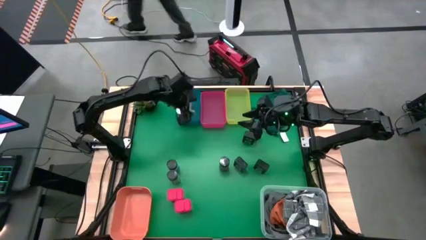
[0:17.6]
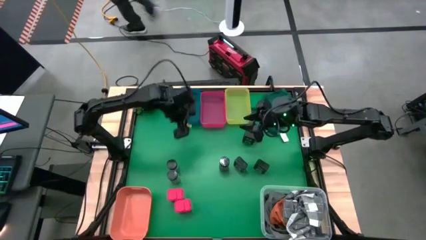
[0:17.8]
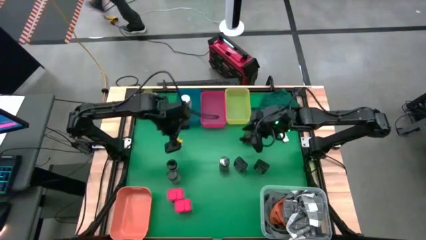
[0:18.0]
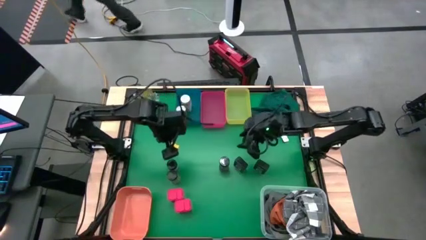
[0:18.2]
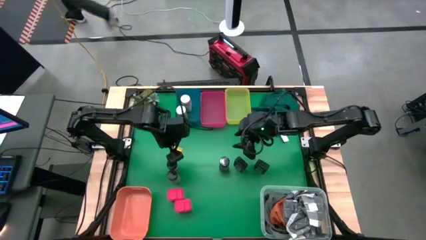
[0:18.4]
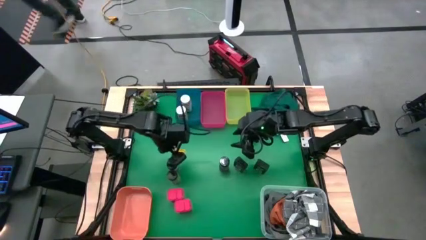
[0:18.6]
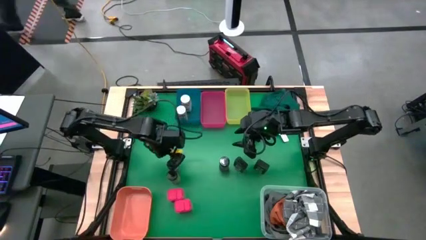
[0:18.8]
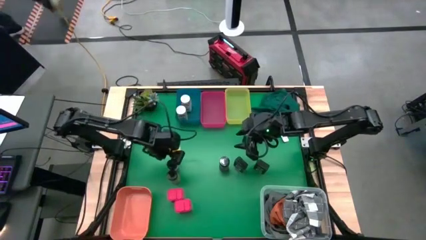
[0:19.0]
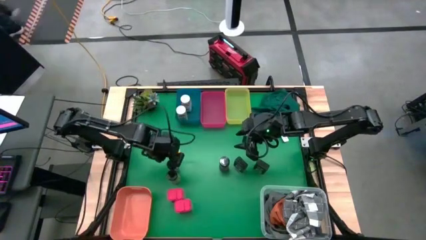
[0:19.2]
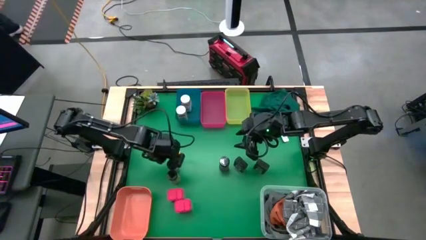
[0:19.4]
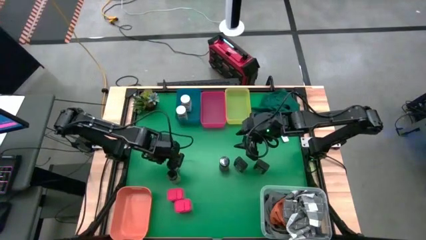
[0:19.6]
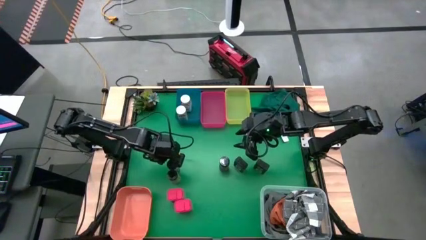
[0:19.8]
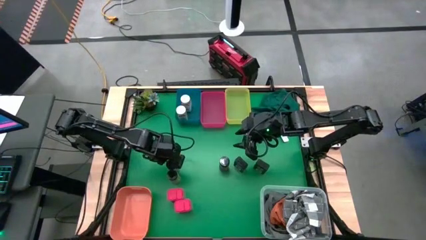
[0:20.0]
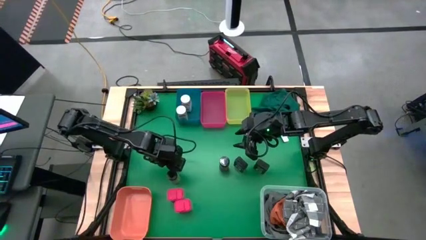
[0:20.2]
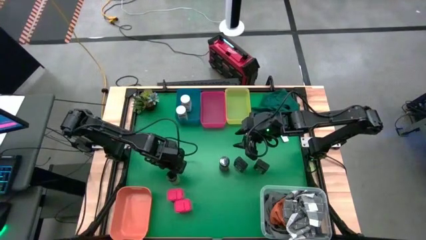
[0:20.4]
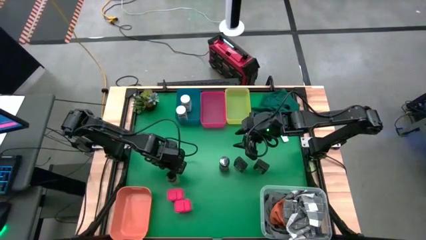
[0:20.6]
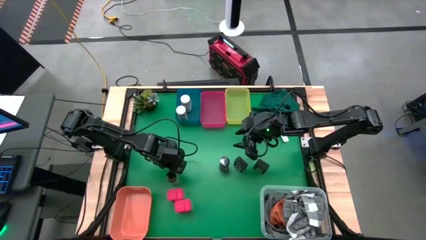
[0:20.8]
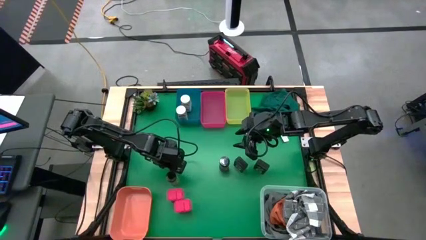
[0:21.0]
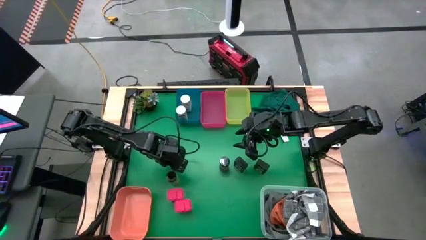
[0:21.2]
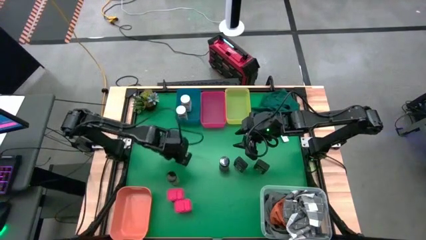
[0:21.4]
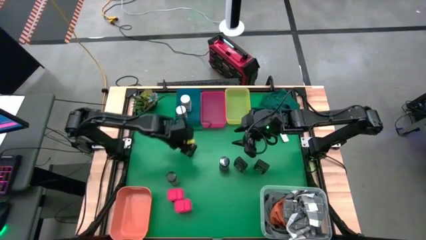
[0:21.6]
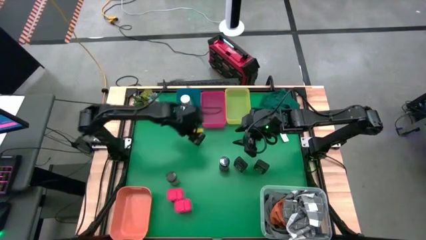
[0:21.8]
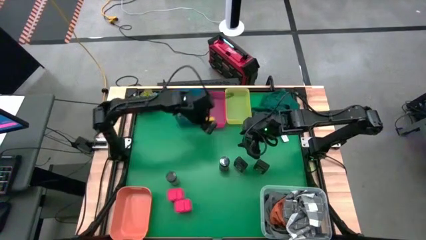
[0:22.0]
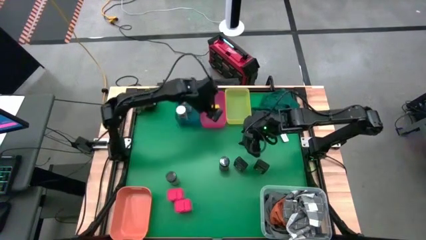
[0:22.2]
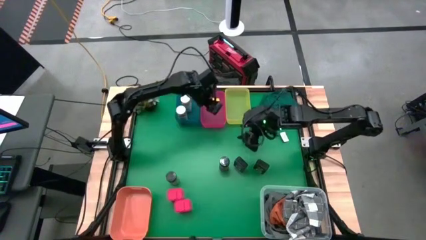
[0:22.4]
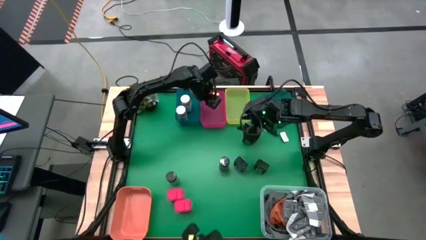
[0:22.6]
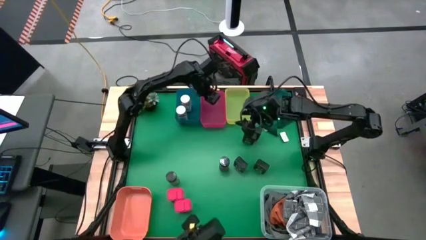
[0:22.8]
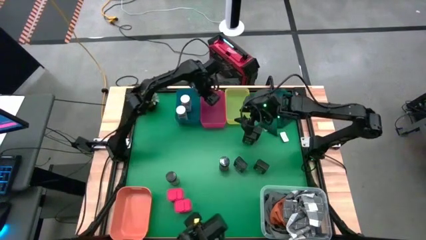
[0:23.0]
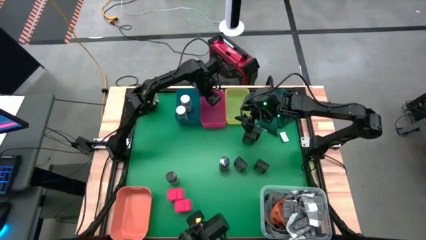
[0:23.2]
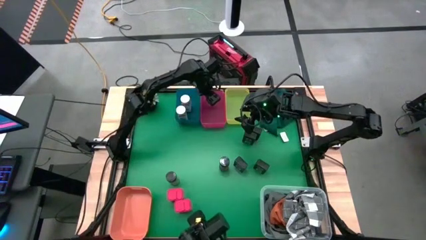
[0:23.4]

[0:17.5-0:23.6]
Task: Sort spices by type
Put the top left black seasoning bottle into the pink bin

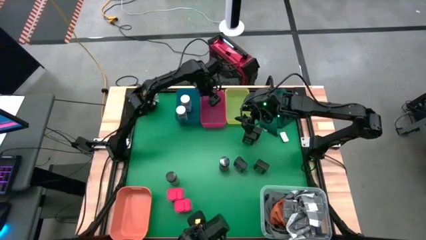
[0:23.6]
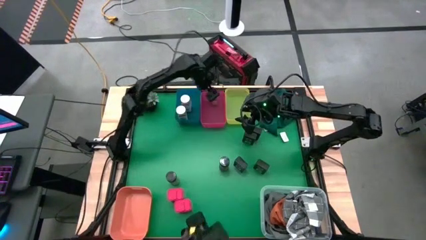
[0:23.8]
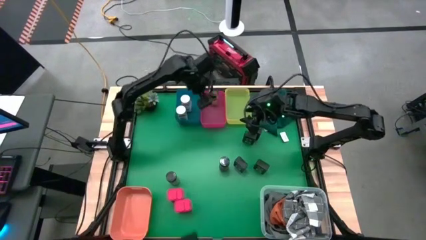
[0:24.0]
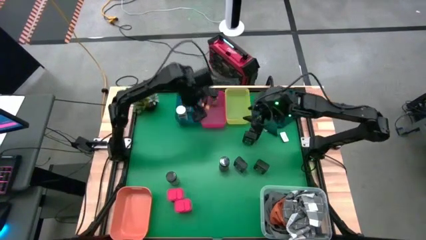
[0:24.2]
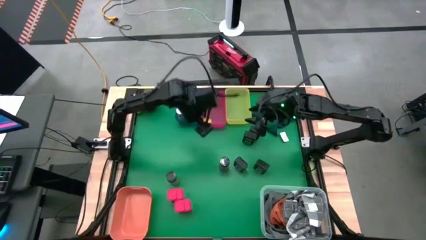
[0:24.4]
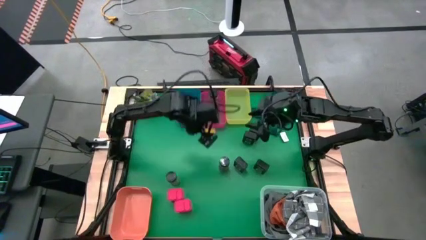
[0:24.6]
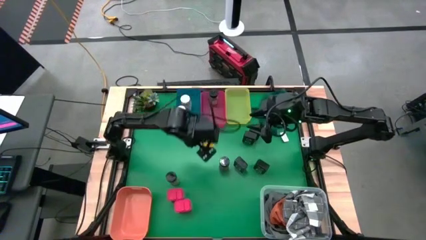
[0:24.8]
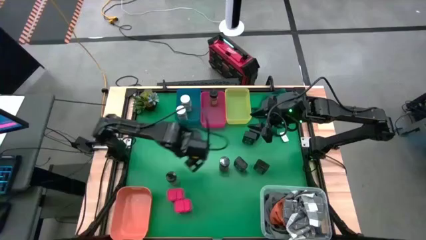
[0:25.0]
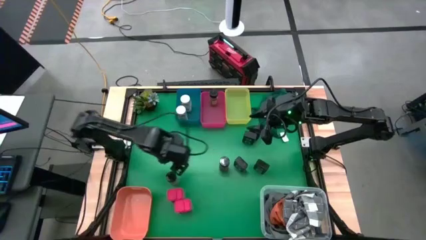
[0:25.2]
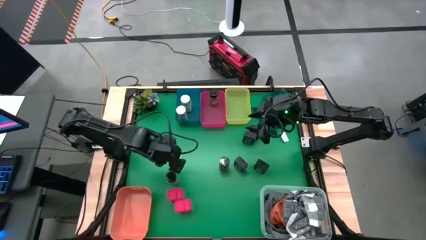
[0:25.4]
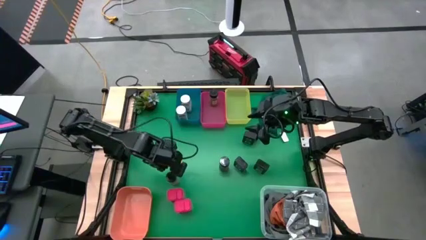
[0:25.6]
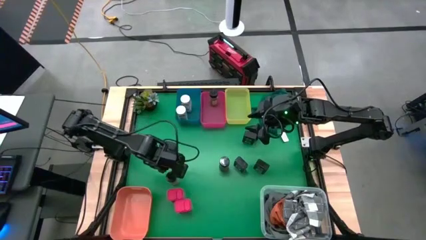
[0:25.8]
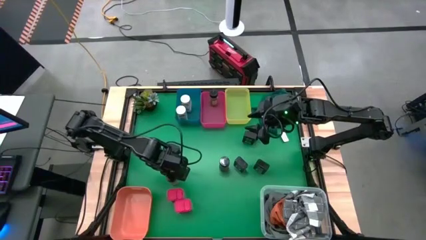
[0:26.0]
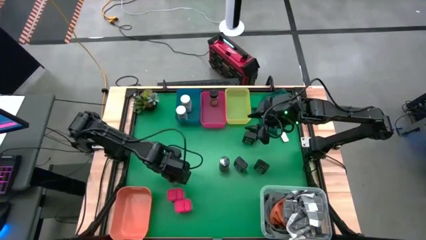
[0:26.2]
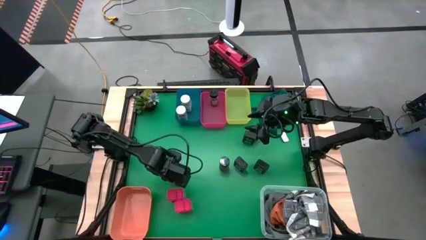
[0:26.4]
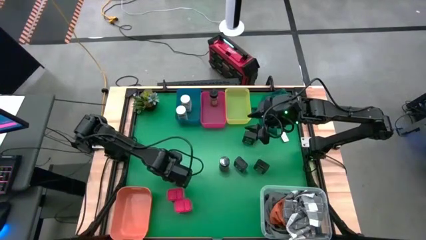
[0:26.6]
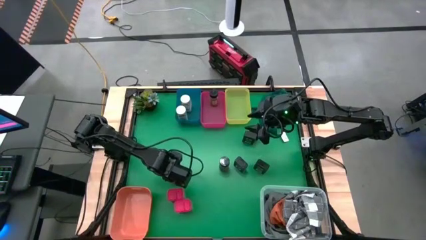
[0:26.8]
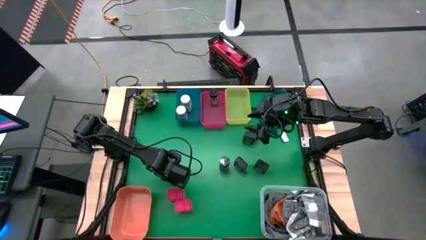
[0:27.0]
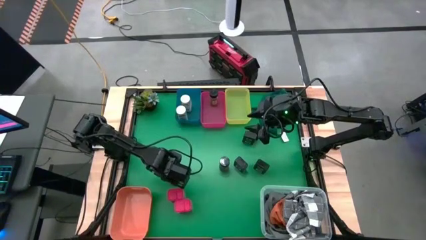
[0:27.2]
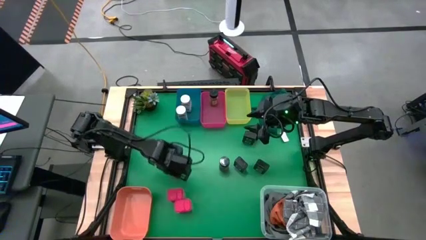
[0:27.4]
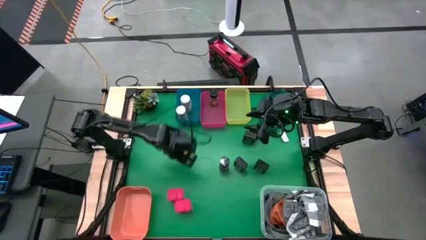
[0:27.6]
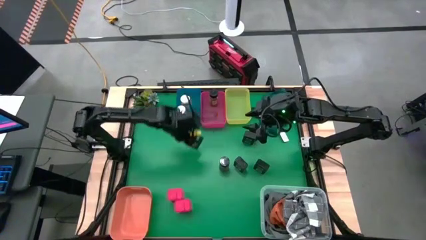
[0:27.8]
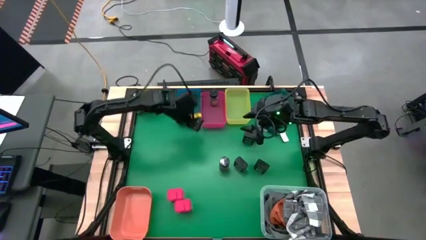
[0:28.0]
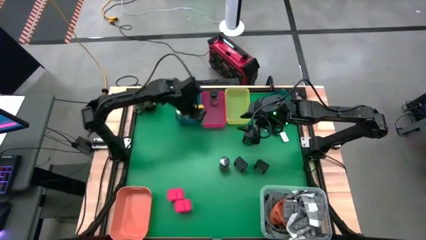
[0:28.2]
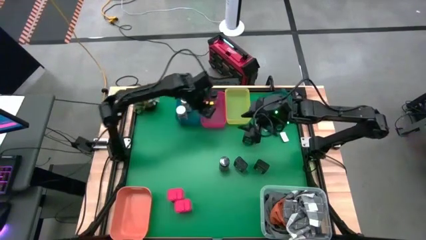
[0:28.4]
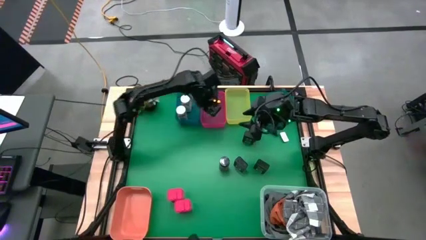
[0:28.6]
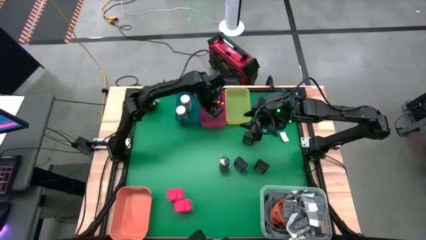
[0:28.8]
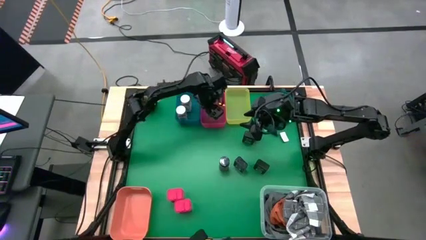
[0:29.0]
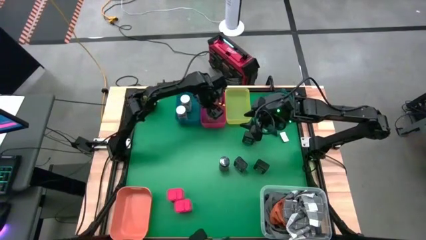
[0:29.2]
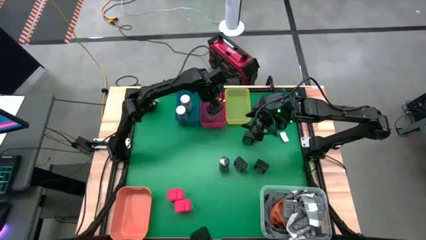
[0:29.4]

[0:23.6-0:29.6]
Put the left black seasoning bottle into the pink bin

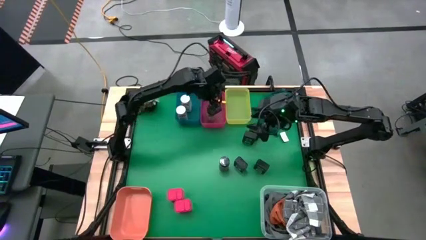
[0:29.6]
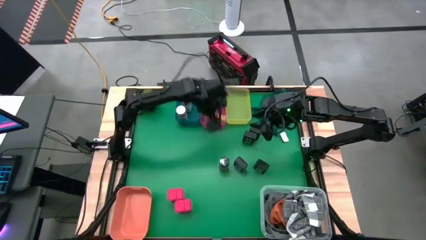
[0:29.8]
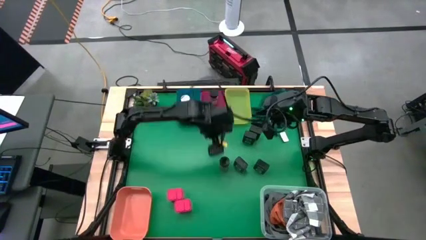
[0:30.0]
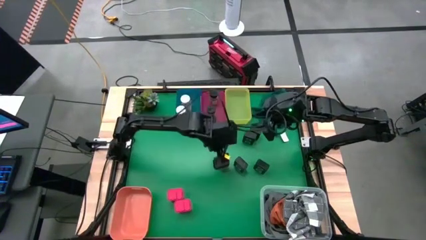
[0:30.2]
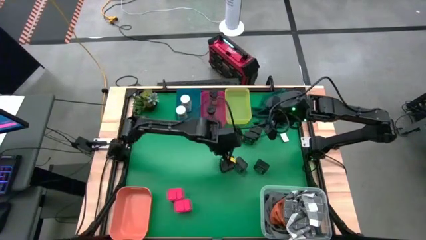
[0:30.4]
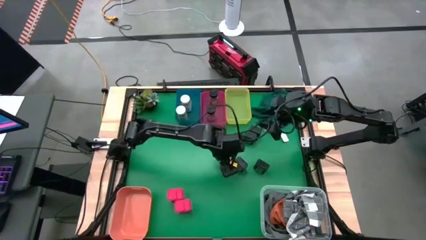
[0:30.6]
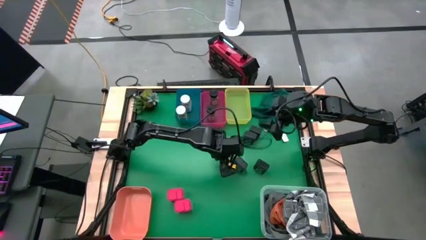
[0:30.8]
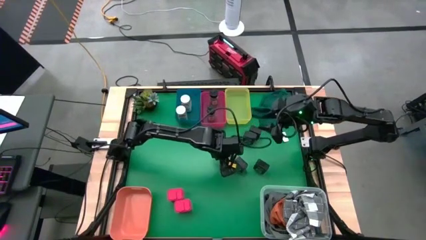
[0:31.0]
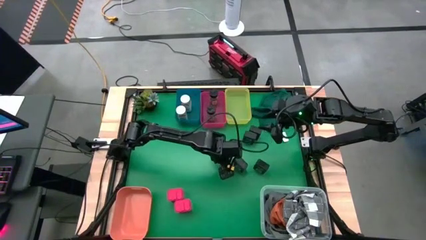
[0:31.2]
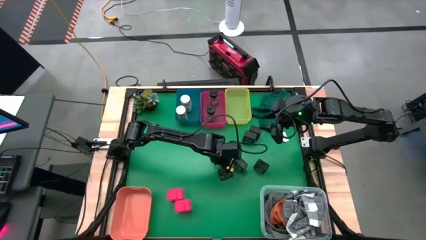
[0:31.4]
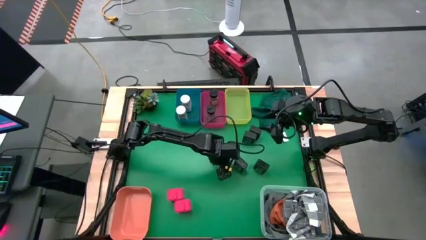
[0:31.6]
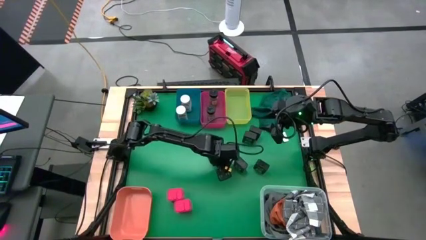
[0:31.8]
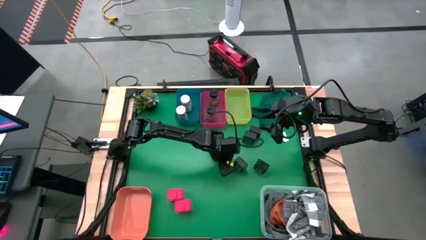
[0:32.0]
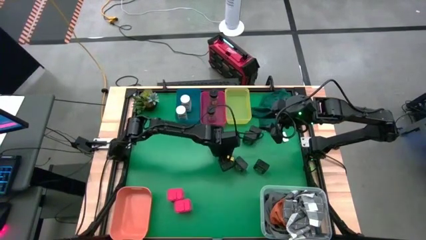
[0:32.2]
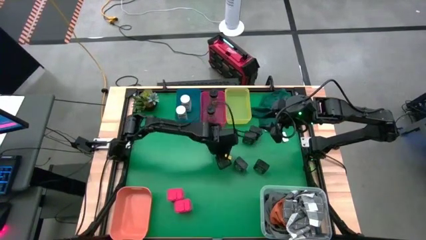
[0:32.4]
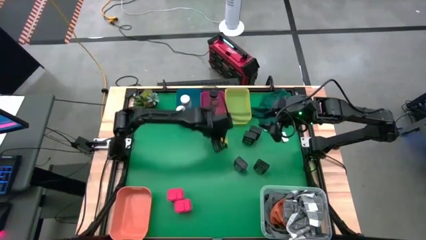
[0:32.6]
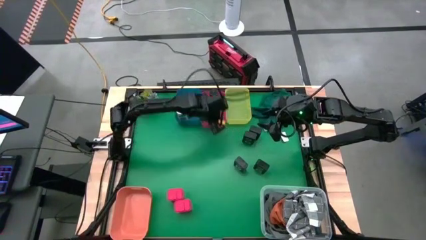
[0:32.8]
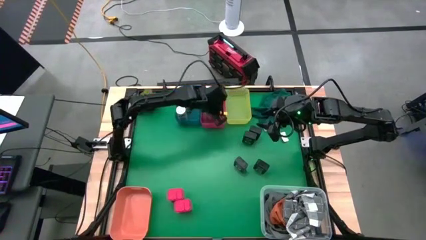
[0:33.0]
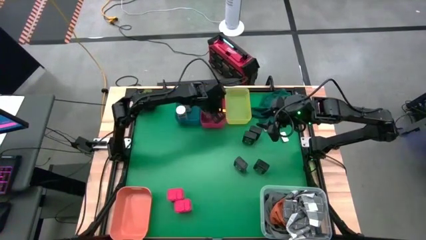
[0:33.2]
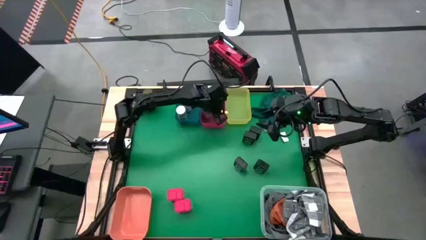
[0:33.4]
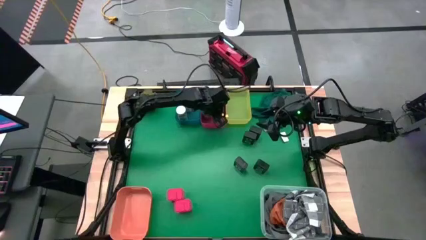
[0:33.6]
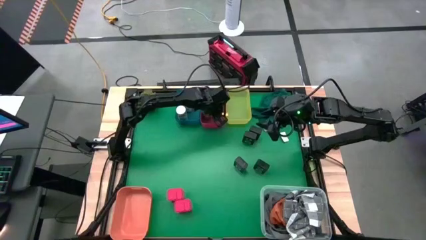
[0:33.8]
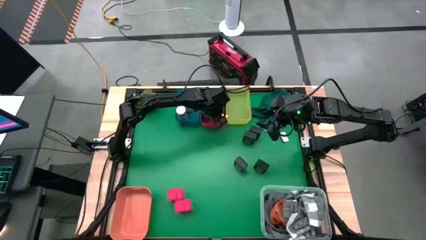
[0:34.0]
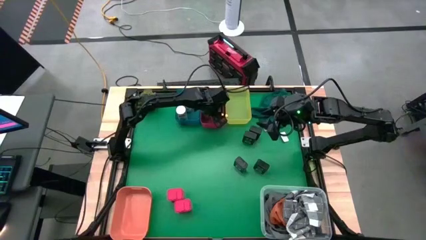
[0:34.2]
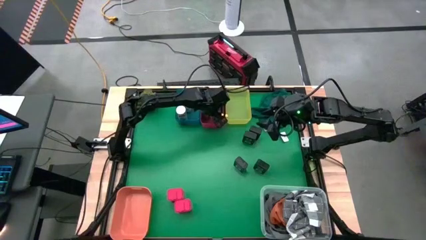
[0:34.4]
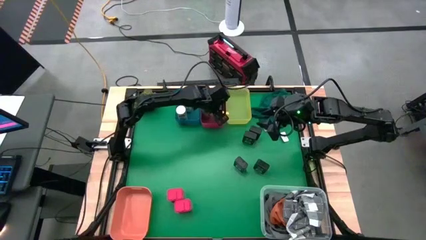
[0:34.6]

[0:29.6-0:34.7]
Put the black seasoning bottle into the pink bin
